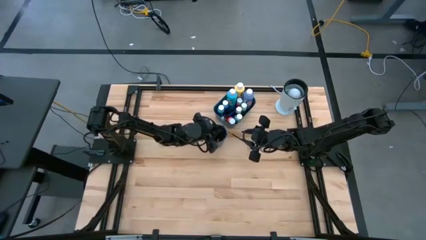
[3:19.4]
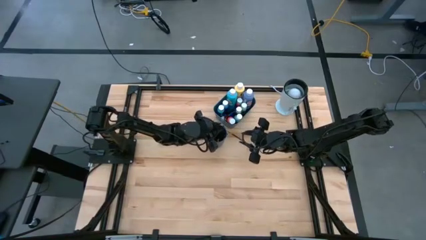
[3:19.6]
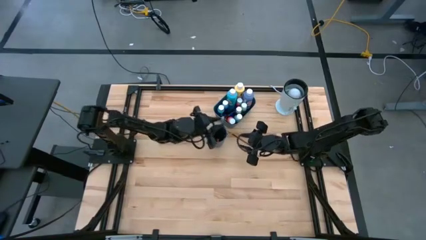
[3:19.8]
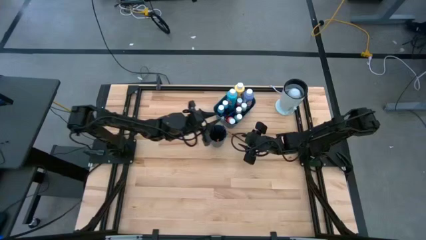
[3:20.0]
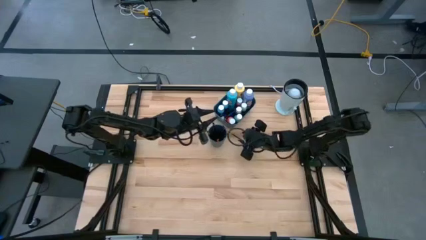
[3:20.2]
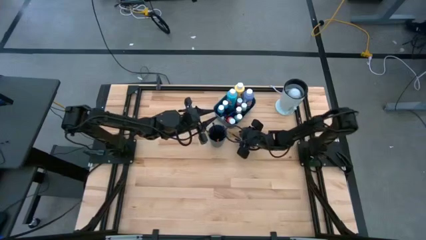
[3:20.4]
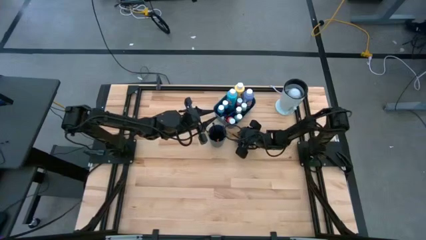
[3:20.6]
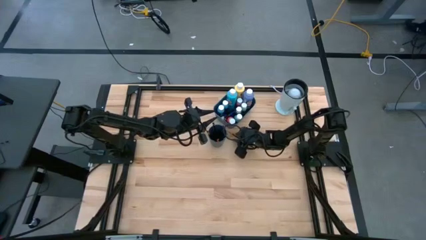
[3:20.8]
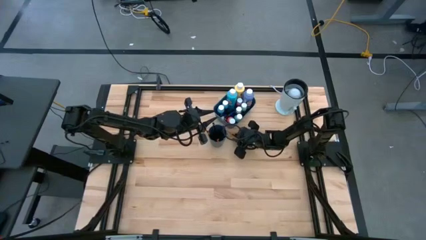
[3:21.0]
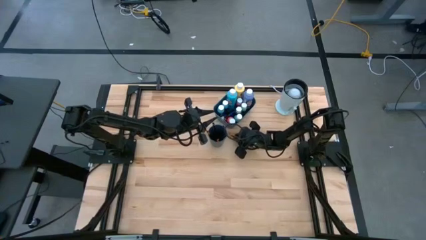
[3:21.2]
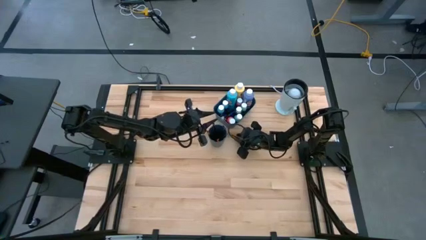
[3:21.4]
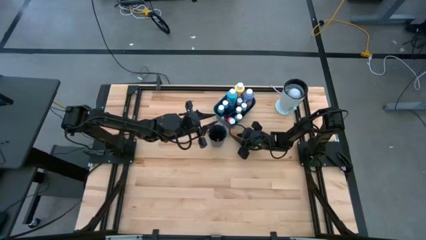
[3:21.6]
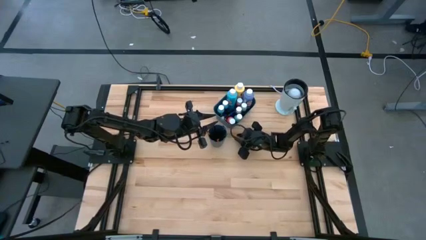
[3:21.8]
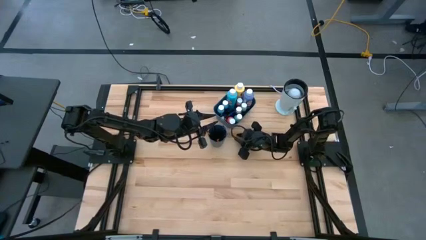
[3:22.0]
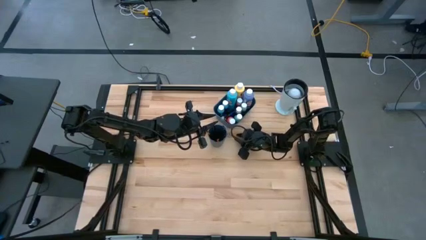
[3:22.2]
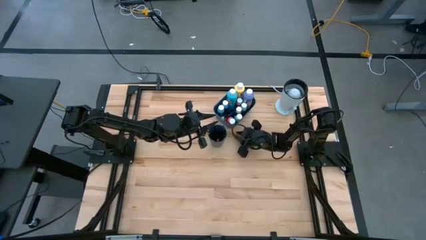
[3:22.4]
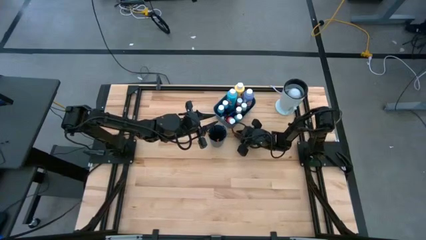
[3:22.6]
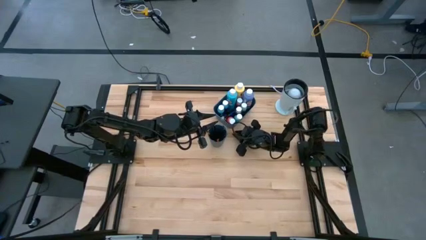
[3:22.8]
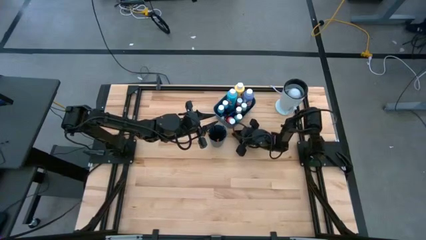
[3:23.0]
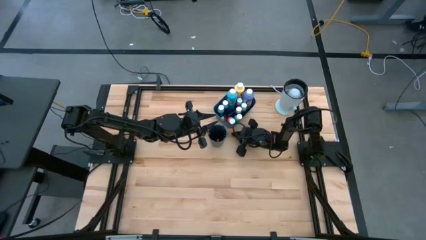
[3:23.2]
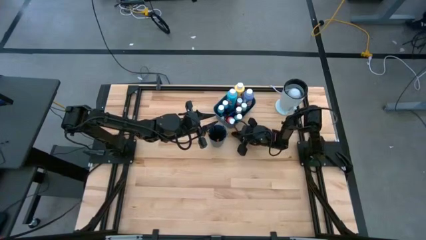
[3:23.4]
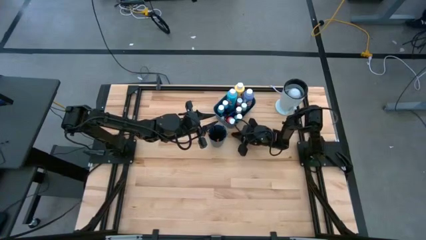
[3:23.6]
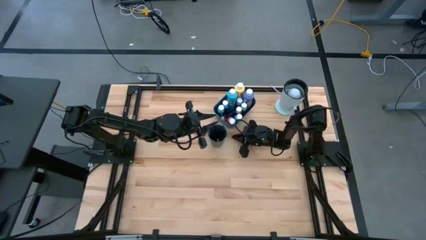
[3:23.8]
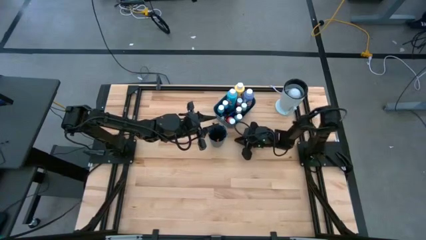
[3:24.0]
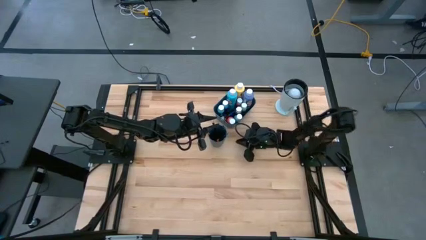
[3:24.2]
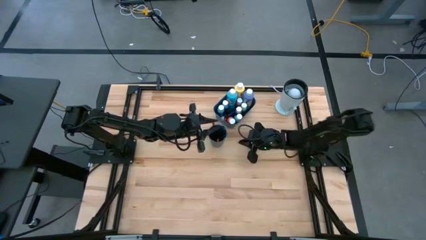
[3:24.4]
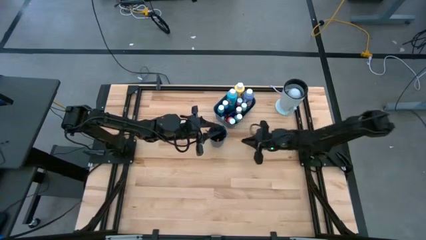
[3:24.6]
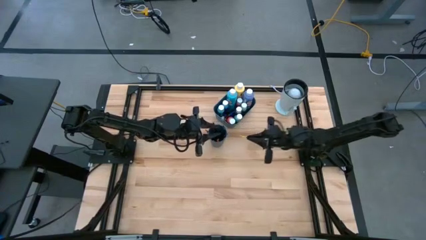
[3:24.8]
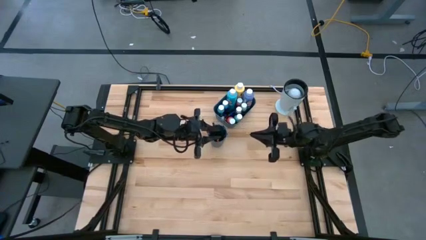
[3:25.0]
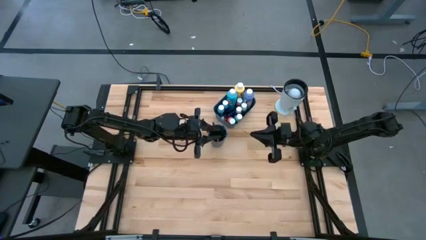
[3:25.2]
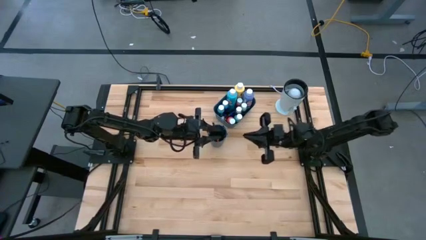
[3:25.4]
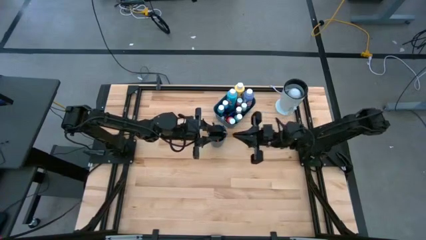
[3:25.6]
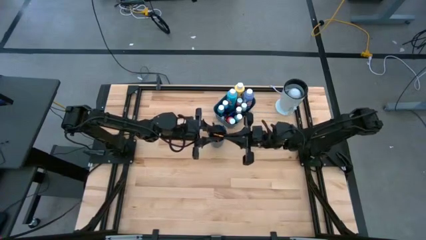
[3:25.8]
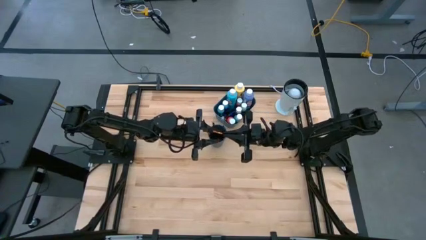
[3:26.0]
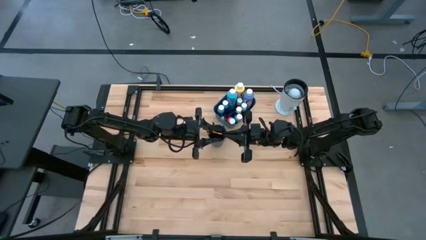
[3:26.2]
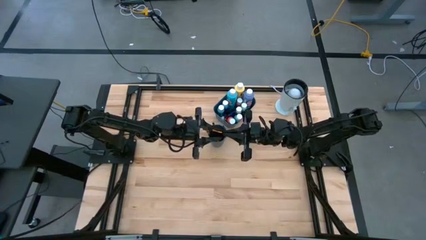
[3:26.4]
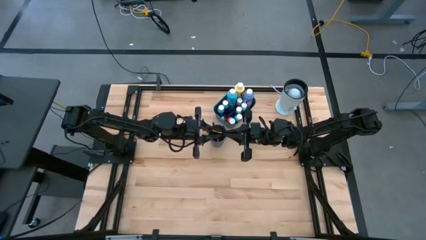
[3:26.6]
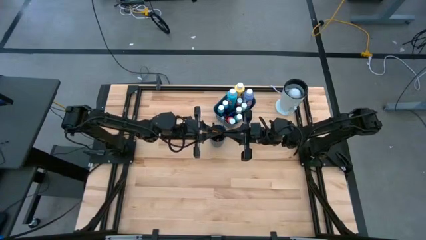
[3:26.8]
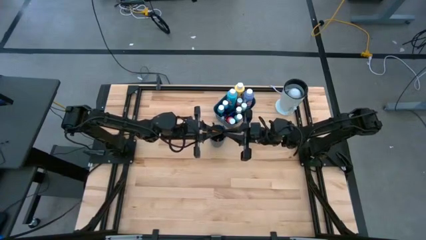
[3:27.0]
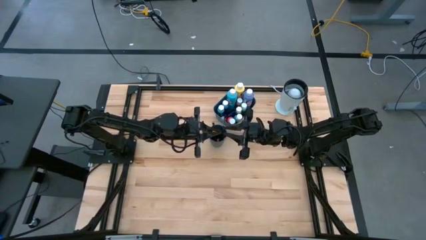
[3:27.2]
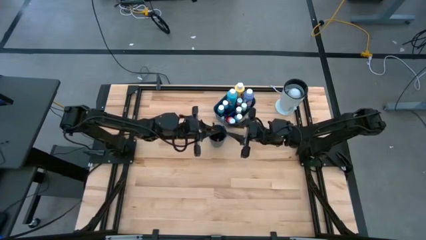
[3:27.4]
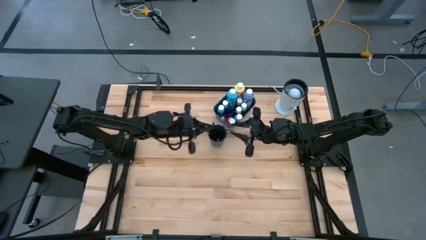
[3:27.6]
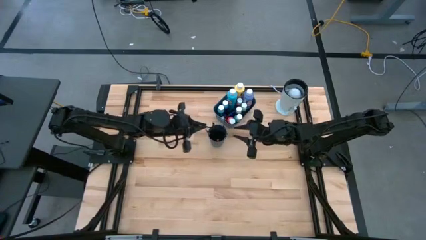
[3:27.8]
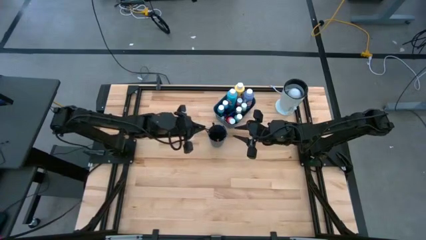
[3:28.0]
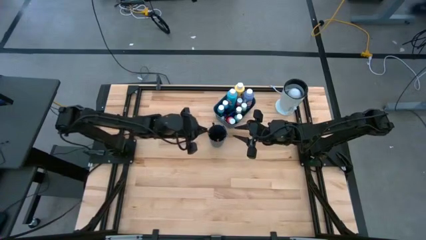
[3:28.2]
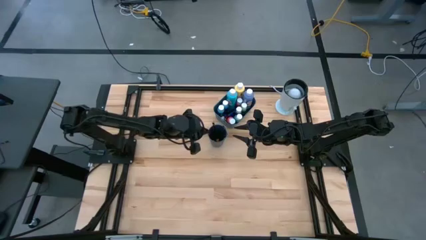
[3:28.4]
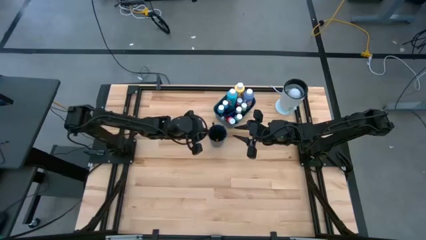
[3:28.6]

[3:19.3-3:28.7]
Task: Pick & Place Paint Supplies
Put the golden paint brush into the blue cup

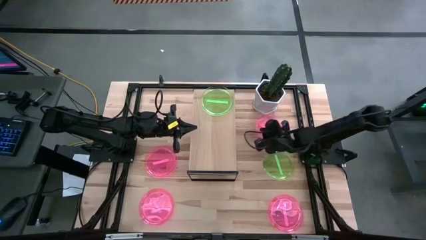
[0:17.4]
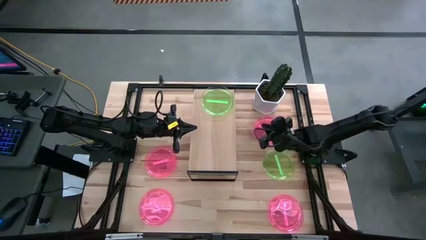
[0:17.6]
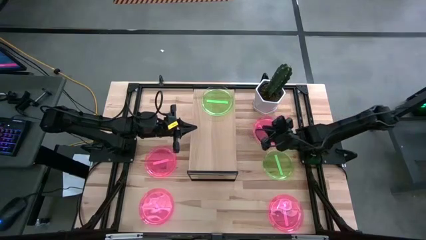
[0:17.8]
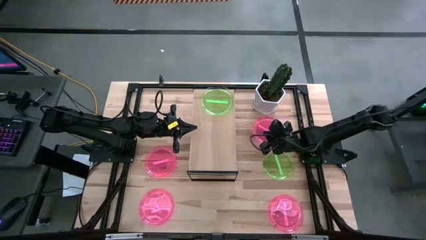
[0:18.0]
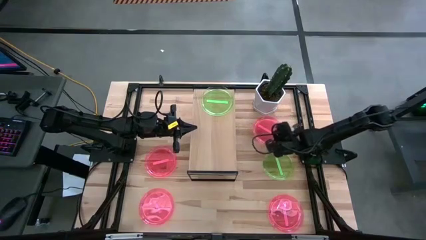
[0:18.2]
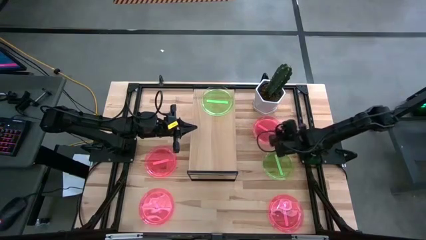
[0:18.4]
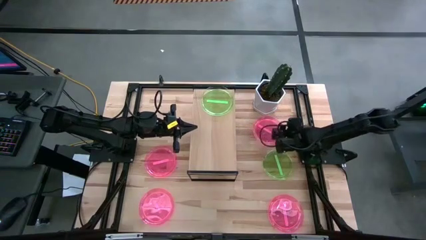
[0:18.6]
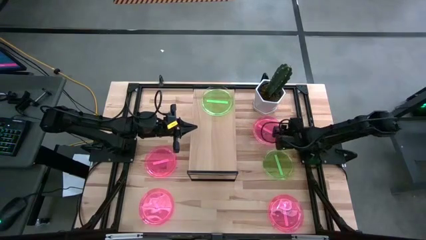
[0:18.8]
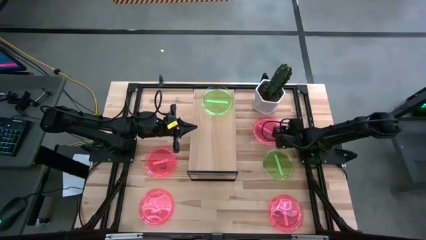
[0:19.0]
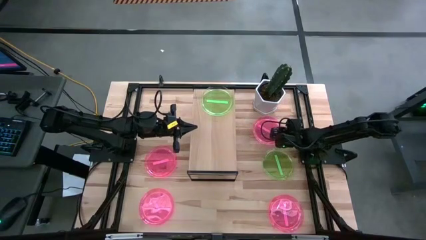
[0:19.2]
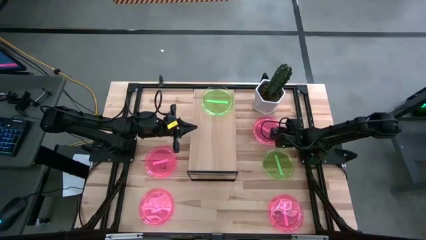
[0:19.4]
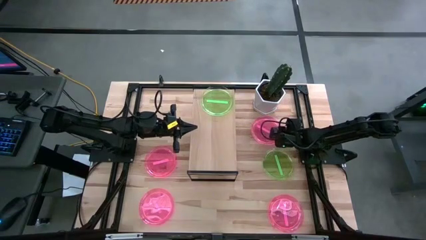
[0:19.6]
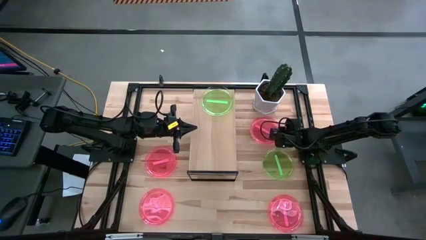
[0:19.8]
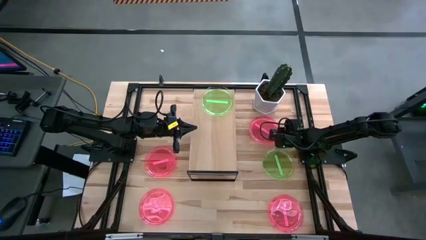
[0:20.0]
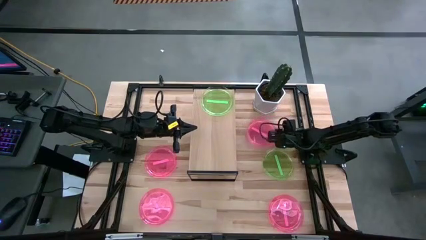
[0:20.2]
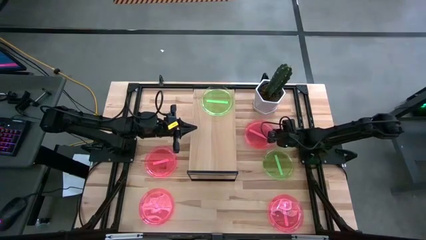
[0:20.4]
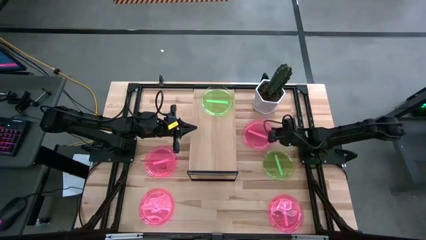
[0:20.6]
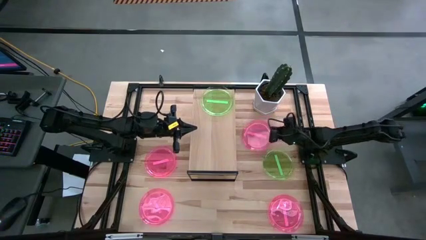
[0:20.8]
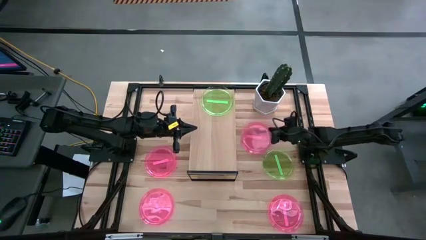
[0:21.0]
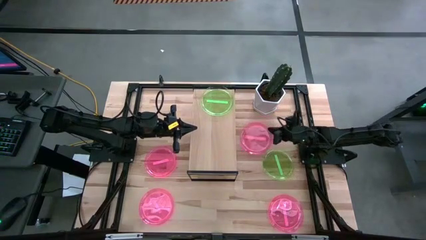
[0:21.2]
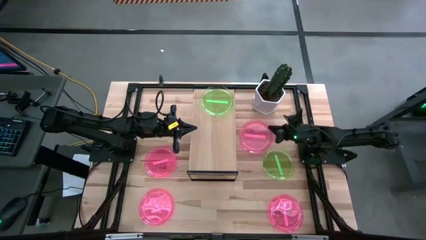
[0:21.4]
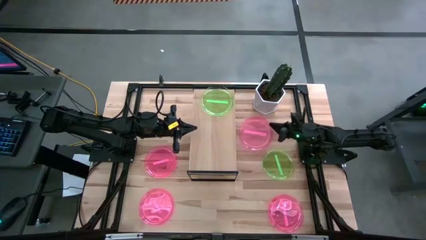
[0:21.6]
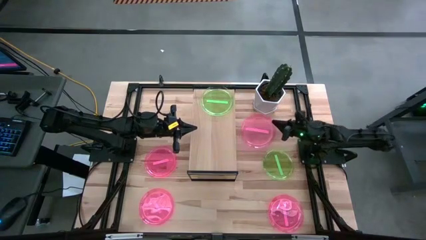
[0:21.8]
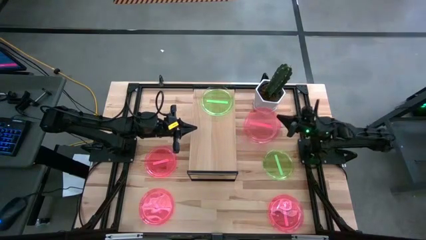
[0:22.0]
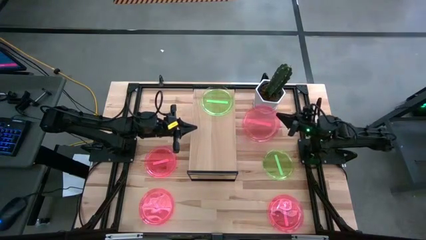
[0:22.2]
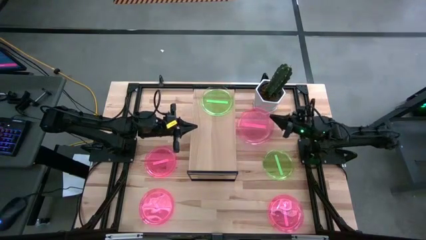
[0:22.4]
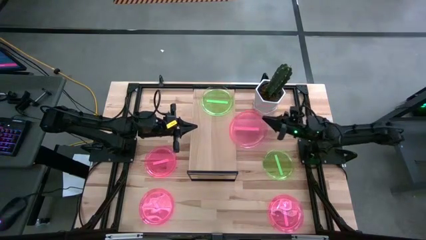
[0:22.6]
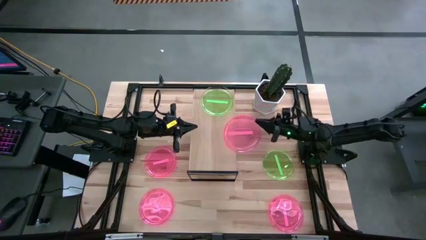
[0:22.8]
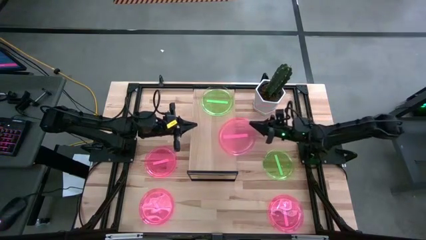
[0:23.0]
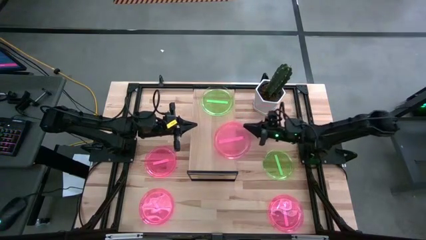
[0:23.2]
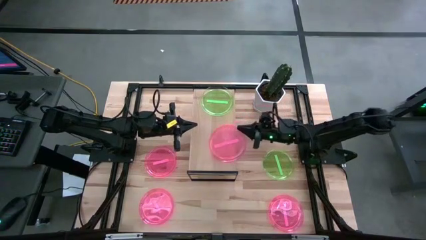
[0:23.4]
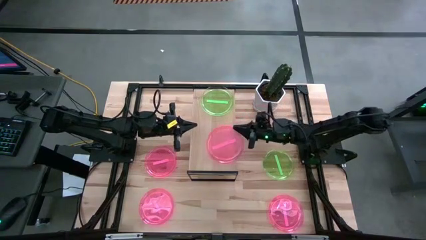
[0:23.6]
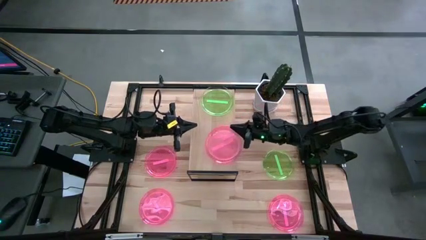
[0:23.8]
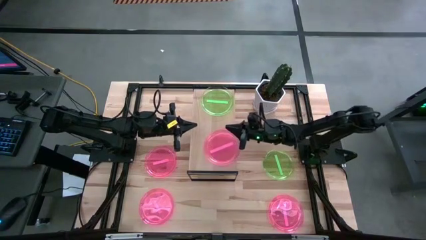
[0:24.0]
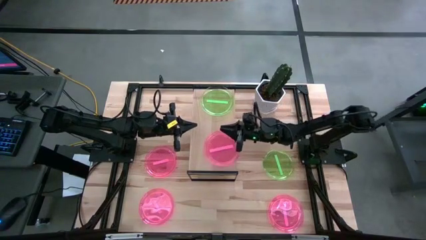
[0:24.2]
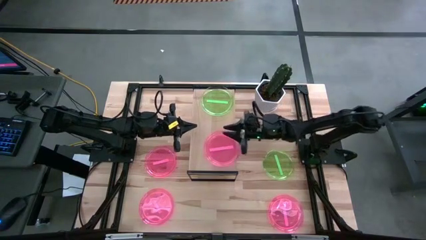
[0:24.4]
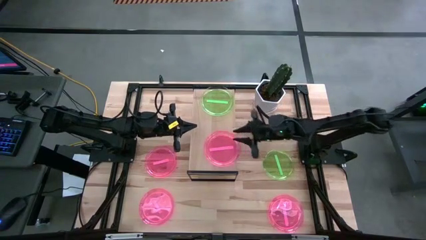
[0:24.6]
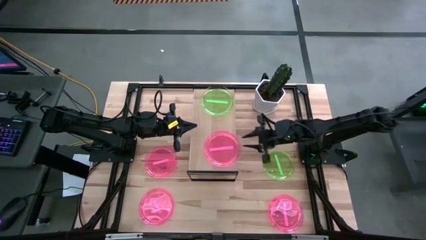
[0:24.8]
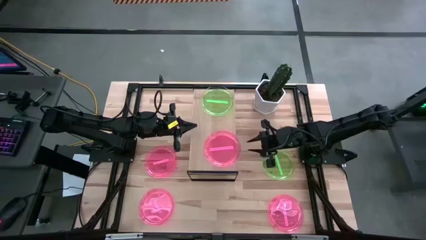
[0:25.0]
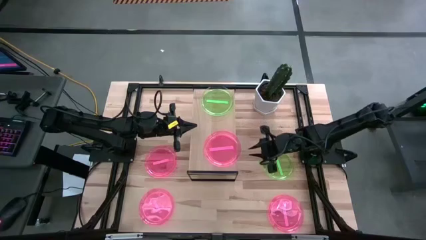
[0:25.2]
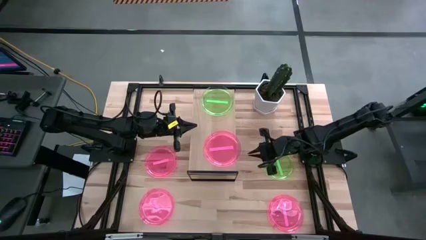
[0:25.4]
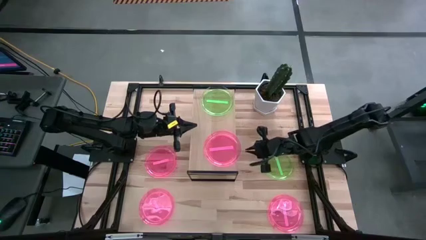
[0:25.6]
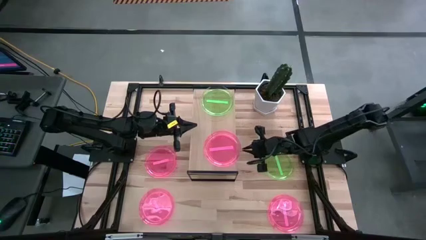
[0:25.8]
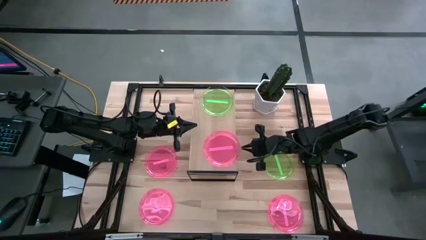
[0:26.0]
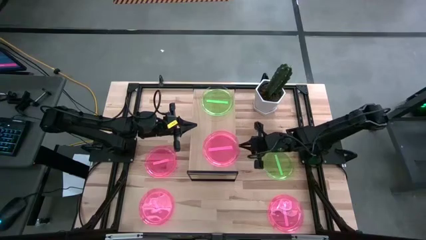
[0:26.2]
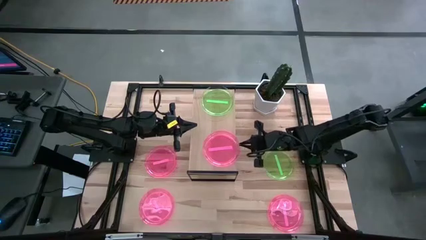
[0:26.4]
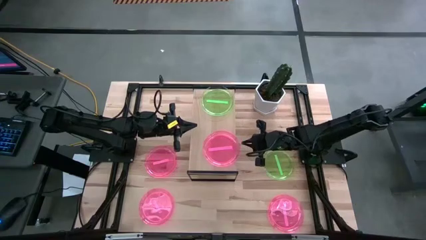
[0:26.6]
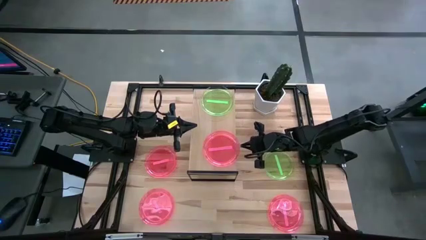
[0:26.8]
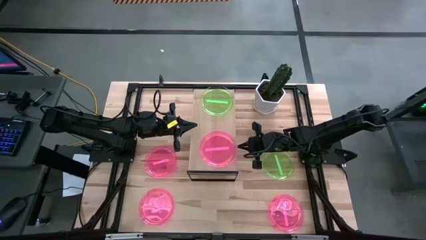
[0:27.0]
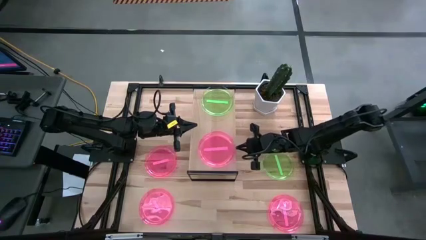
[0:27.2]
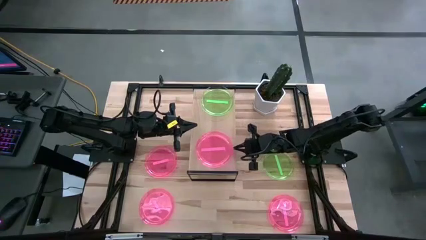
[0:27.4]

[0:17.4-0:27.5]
Task: Place and stack plates onto a shelf
Put the pink plate on the shelf
